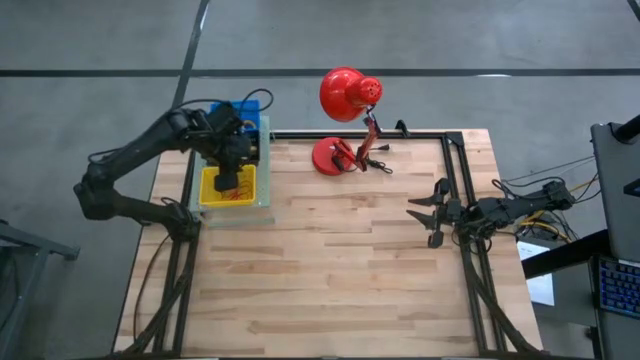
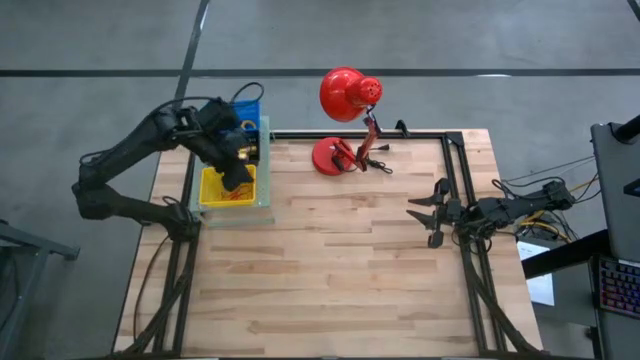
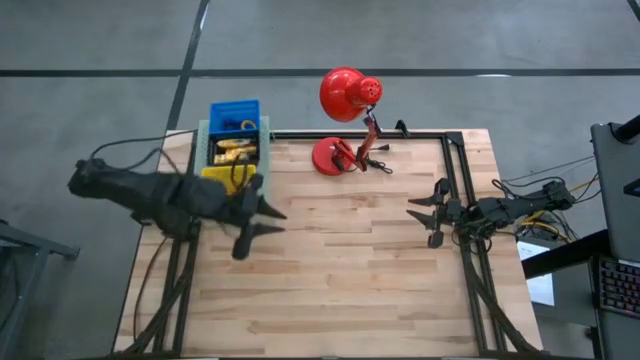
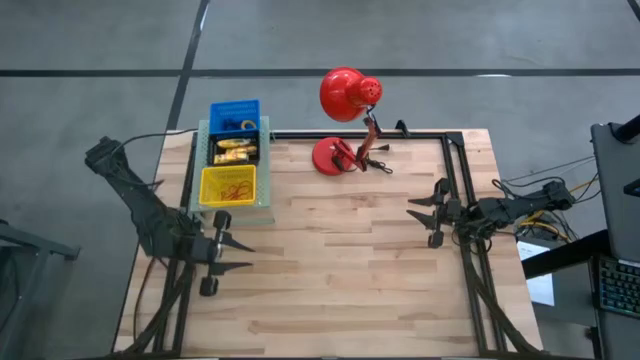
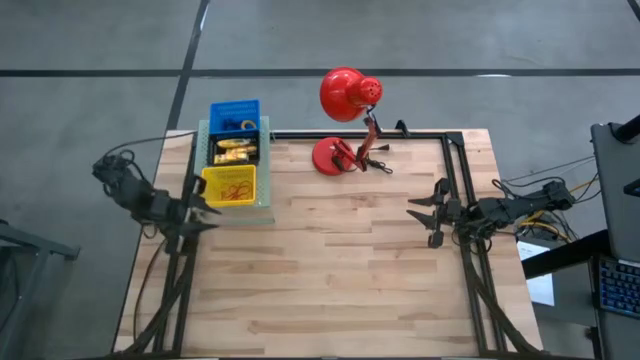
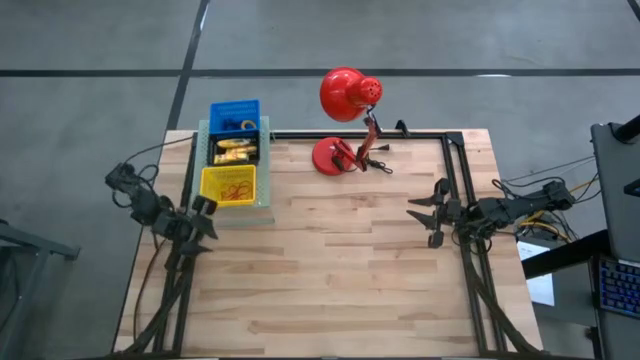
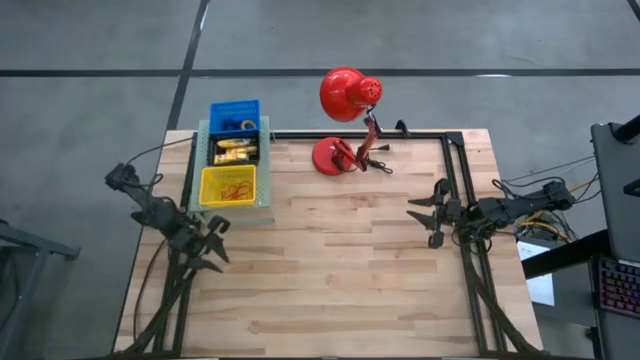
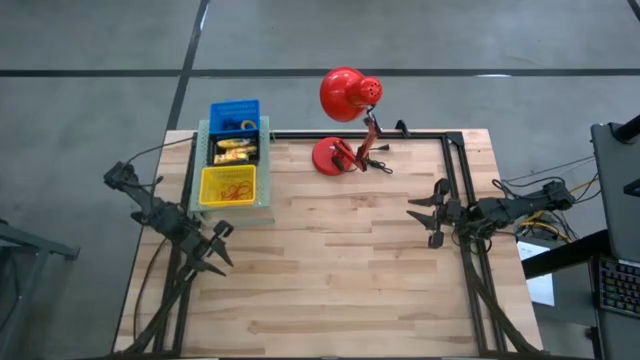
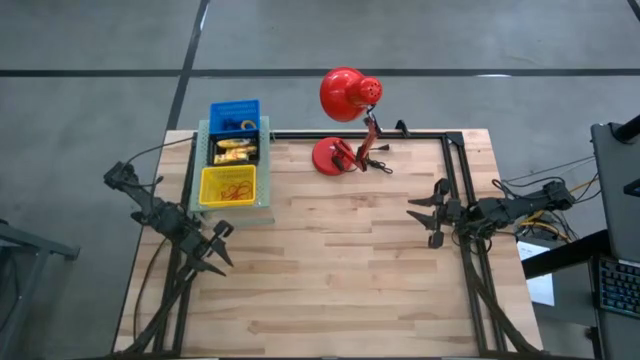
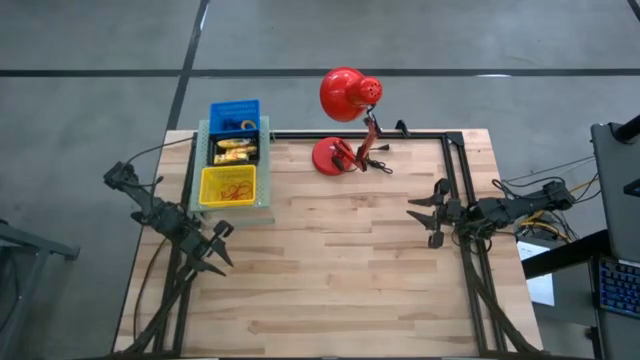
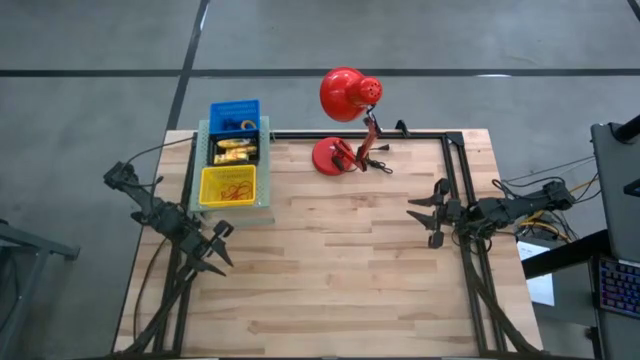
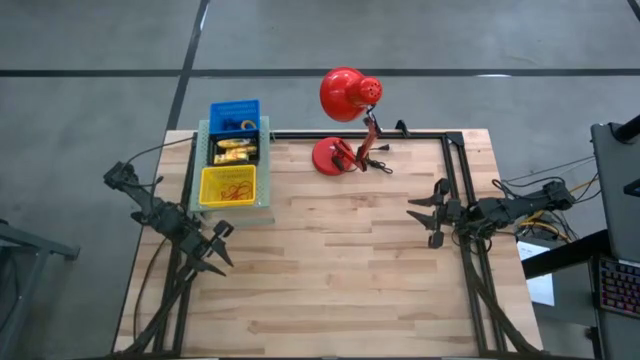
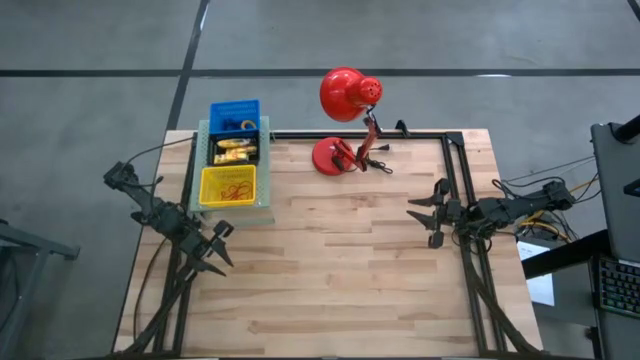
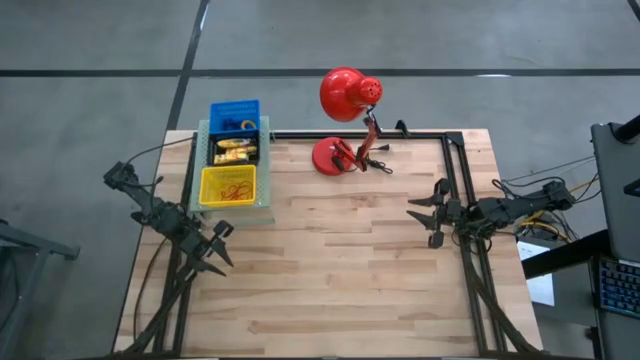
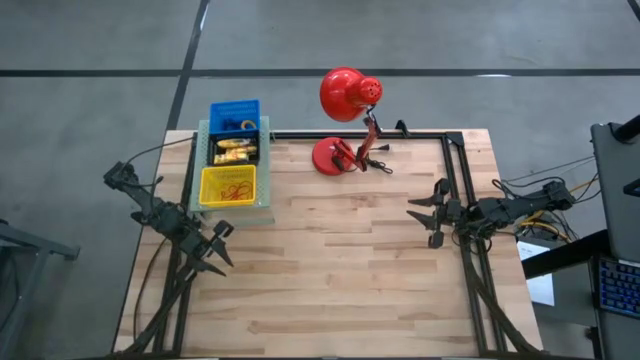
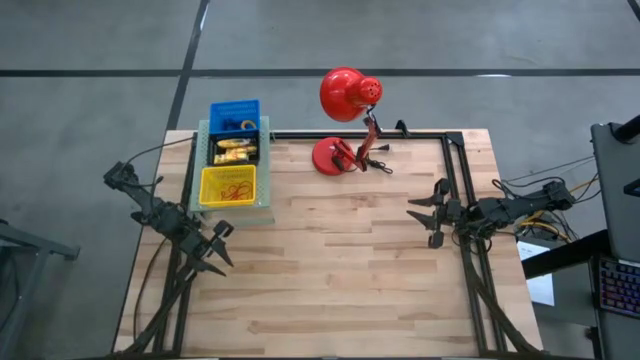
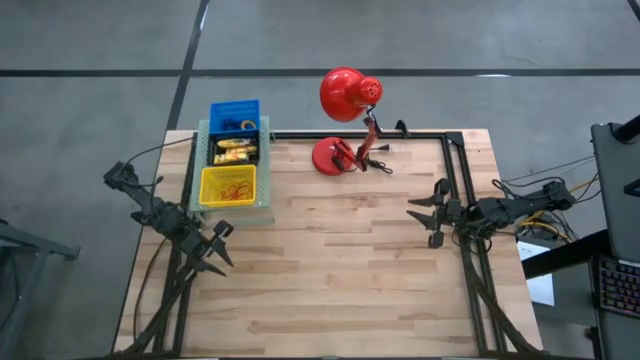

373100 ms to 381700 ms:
Task: Pick & Place Office Desk Supplies
Return to Home Position

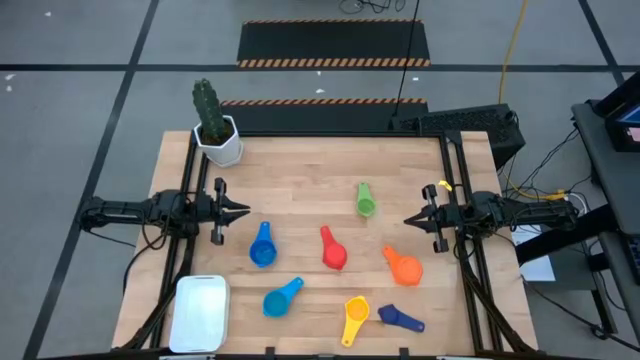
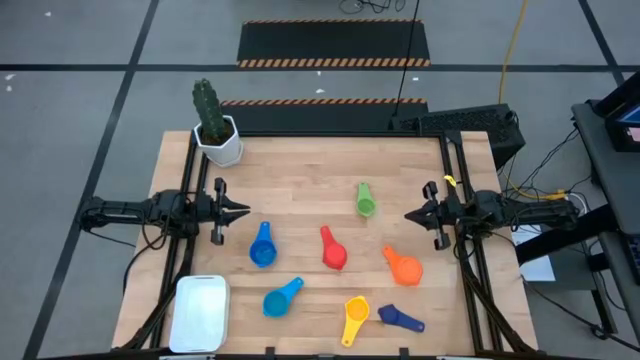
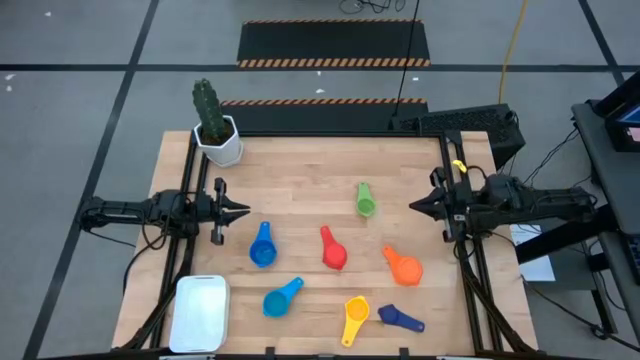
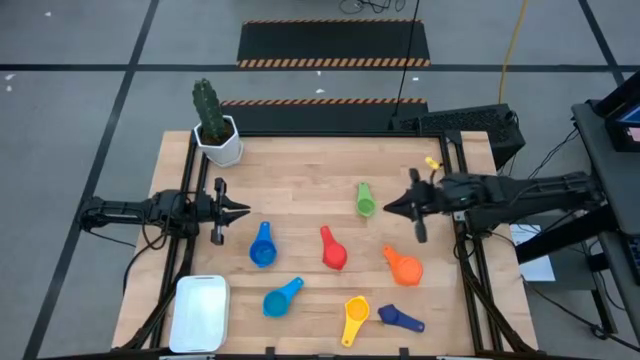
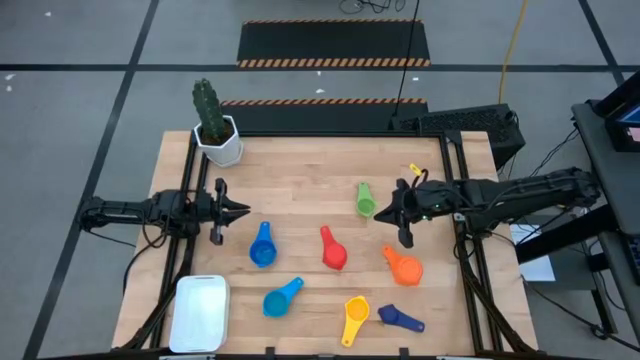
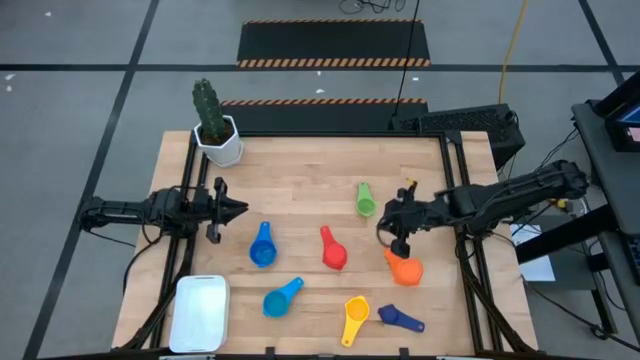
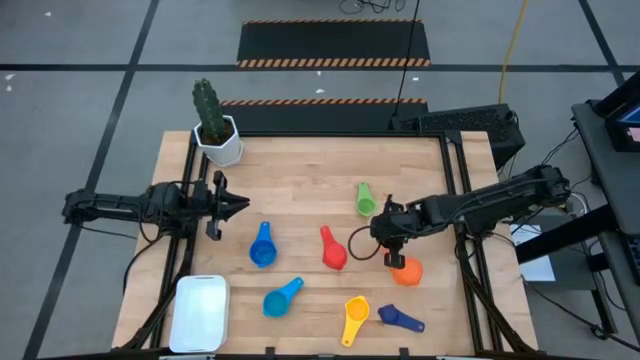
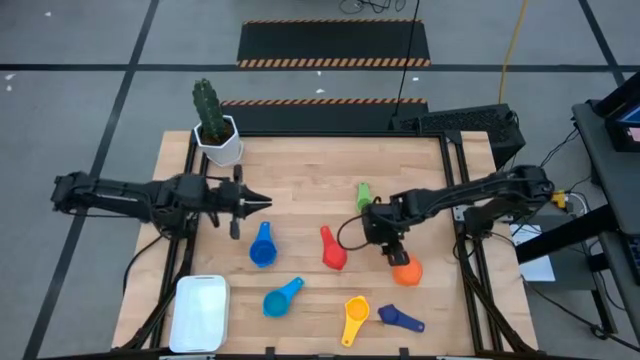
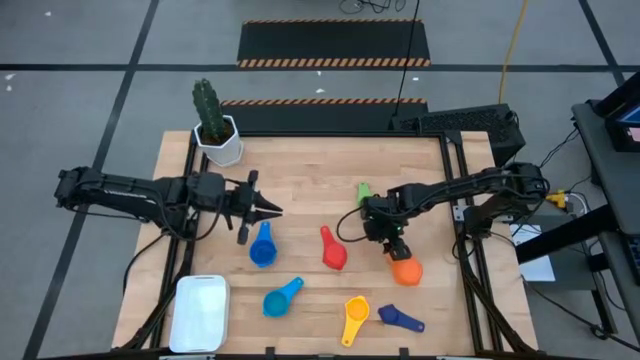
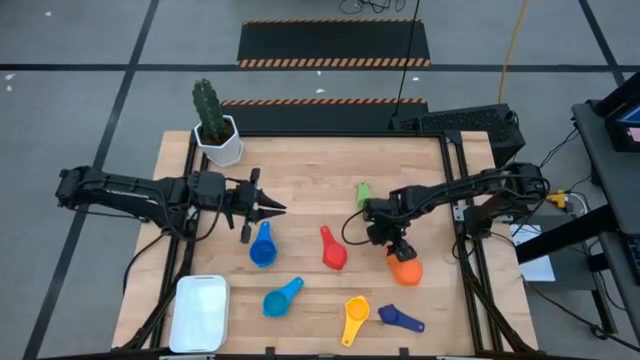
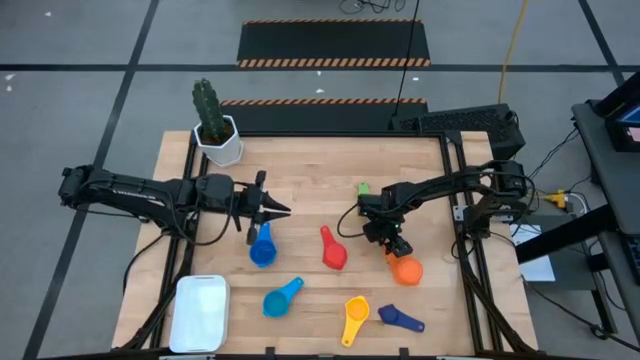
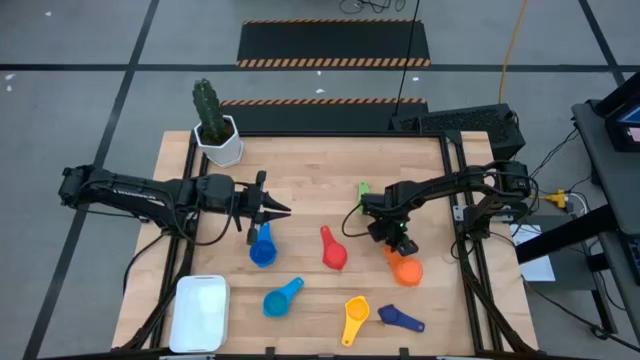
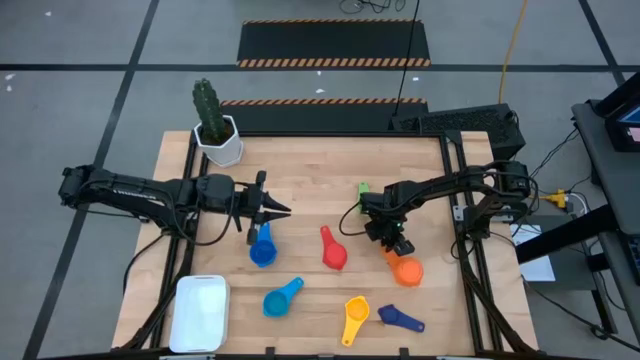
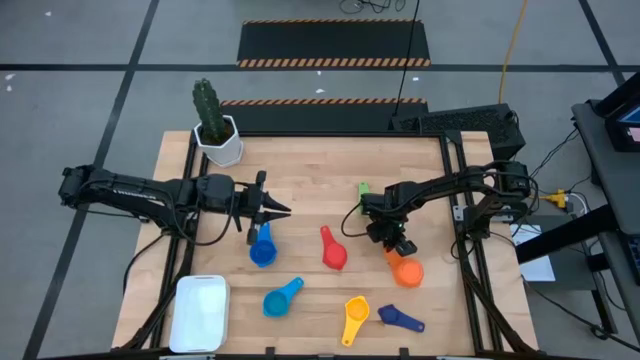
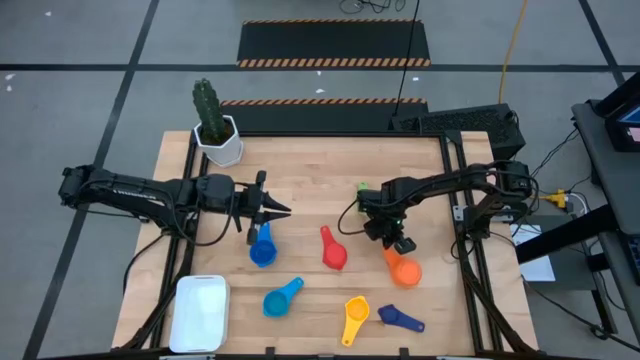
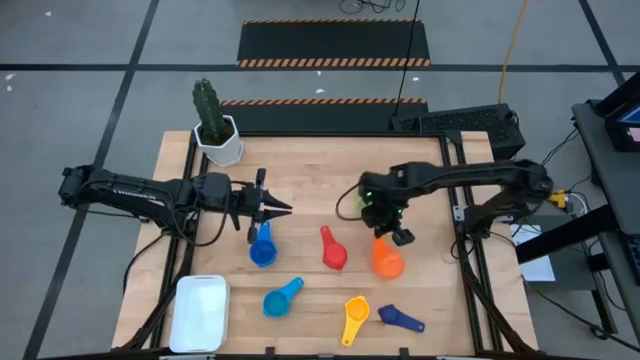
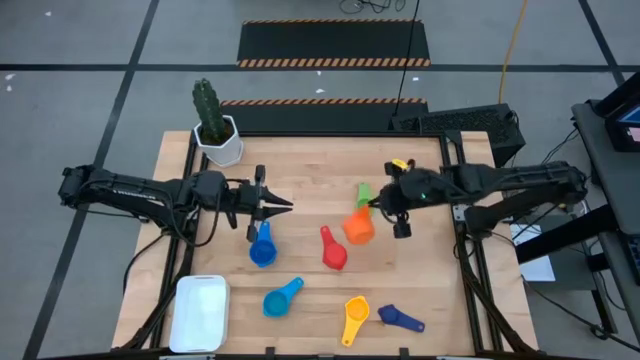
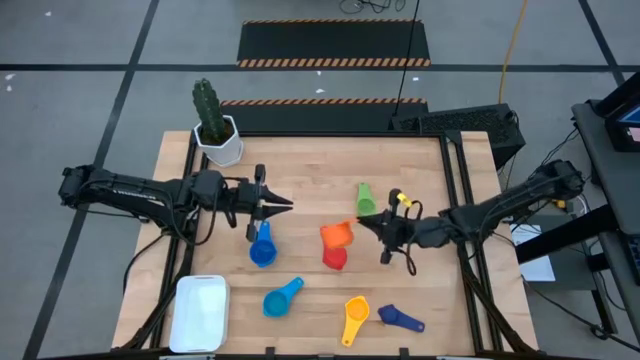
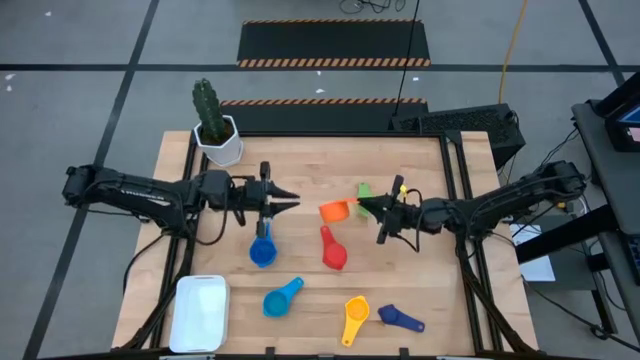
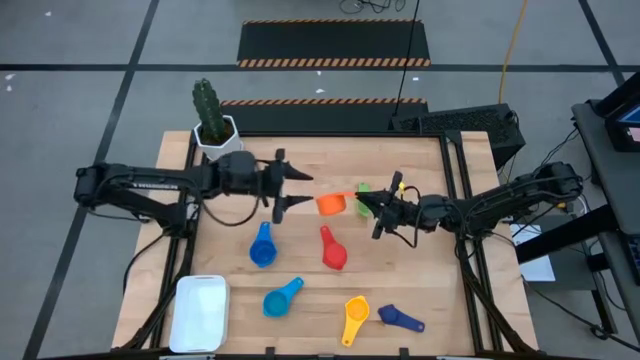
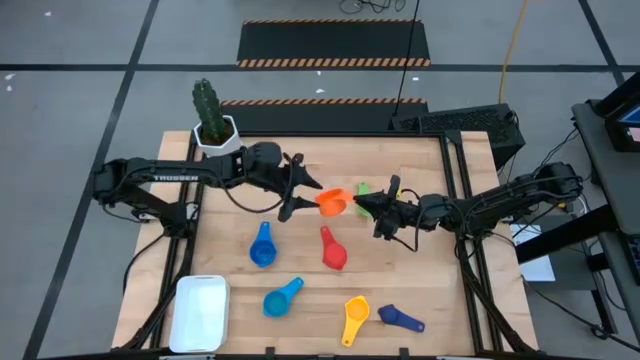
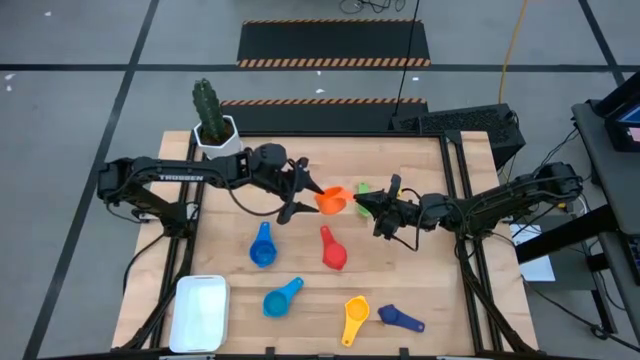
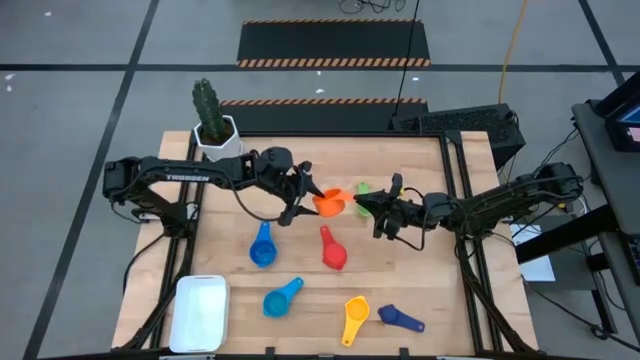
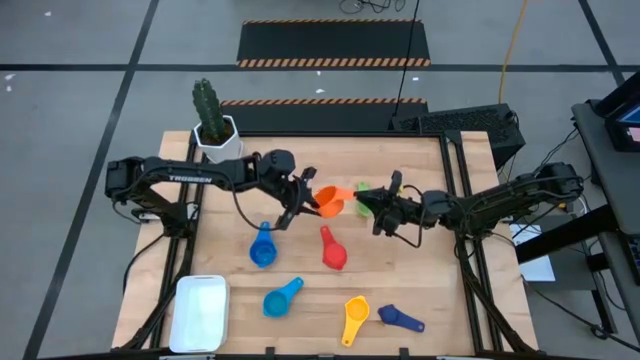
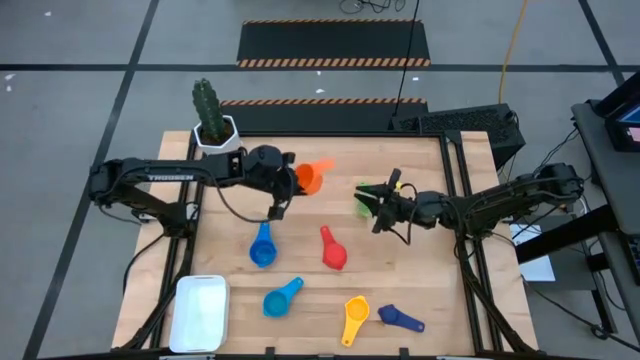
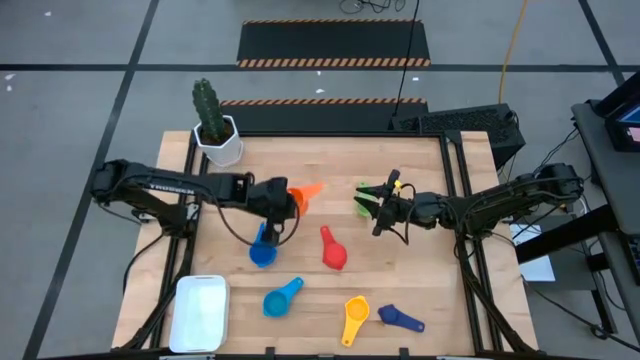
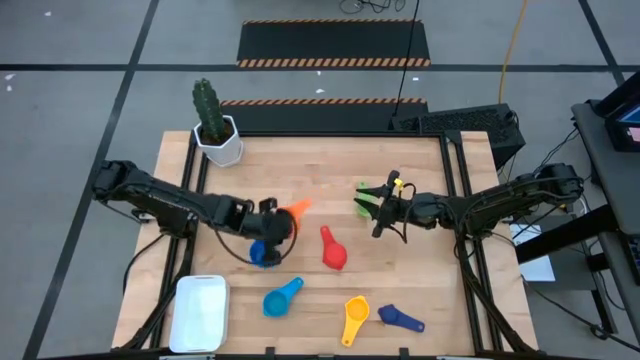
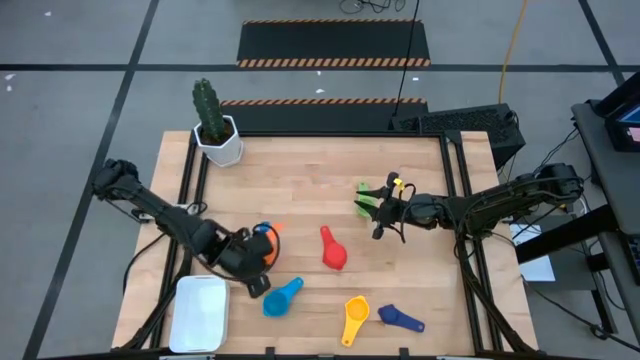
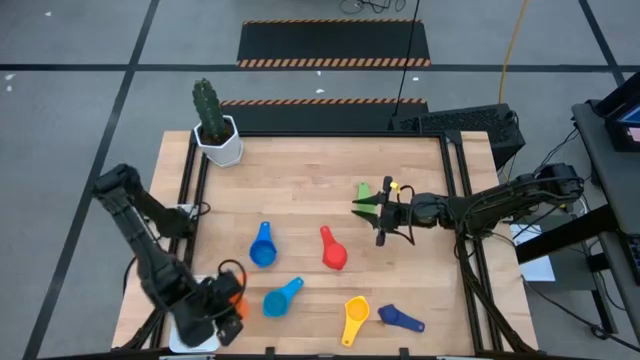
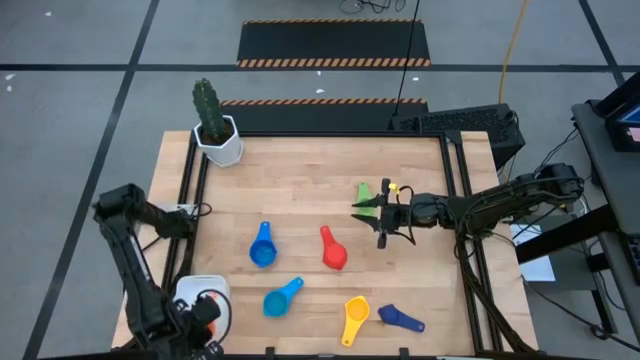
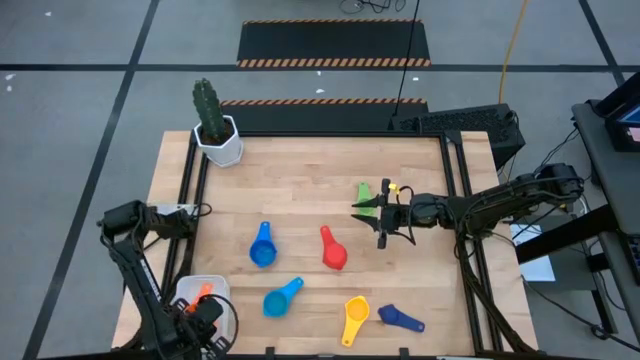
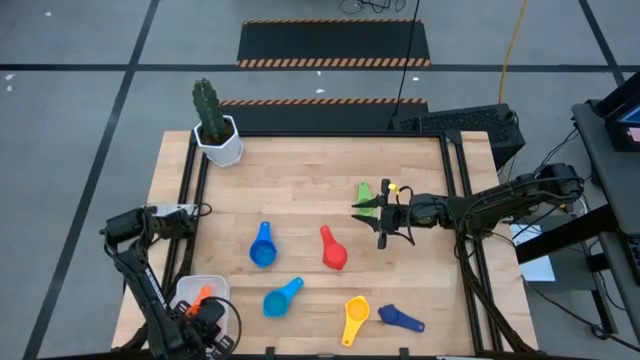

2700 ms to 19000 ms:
Task: Nest measuring cups in basket
Put the orange measuring cup into the white bin
